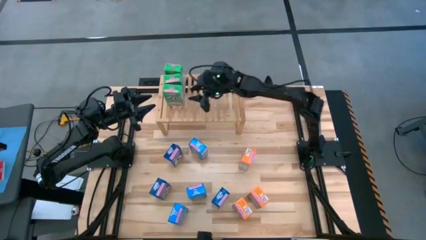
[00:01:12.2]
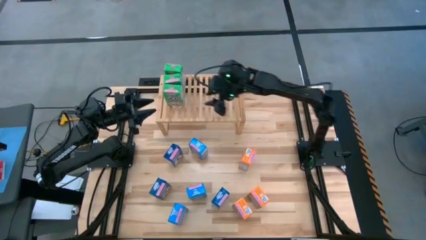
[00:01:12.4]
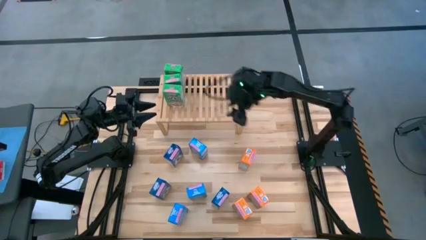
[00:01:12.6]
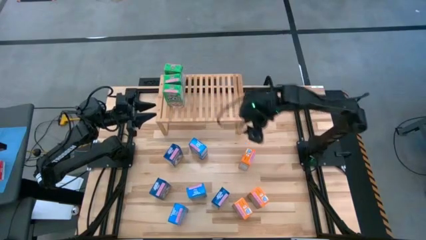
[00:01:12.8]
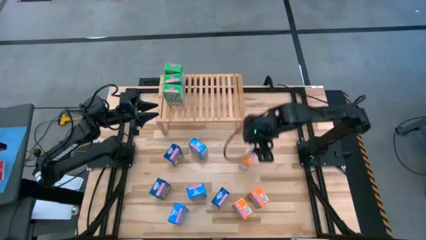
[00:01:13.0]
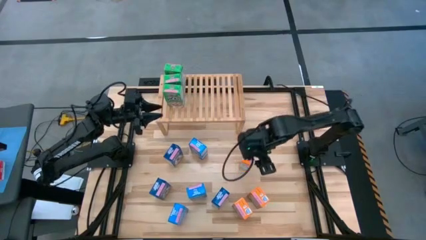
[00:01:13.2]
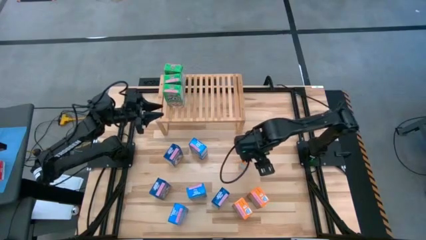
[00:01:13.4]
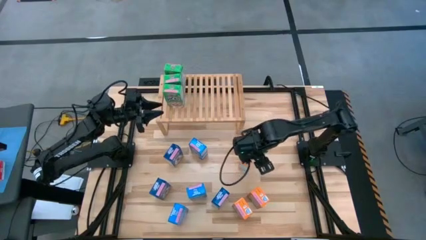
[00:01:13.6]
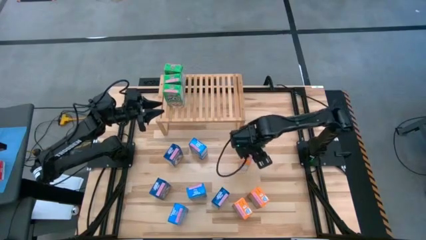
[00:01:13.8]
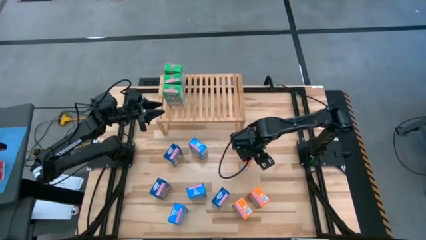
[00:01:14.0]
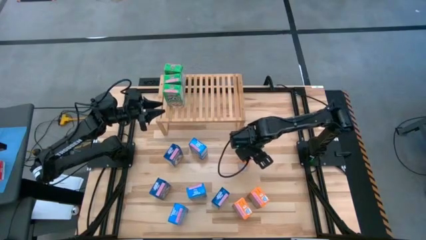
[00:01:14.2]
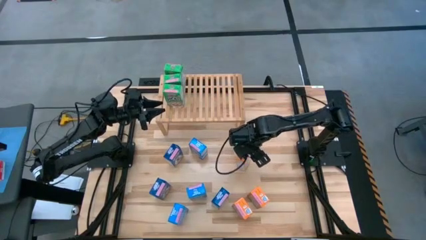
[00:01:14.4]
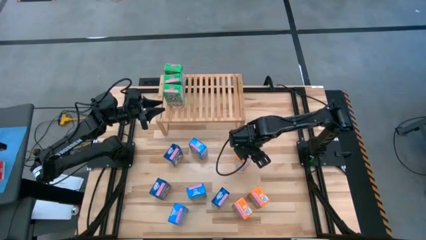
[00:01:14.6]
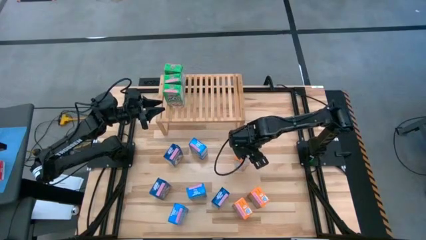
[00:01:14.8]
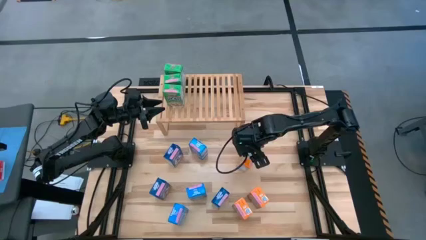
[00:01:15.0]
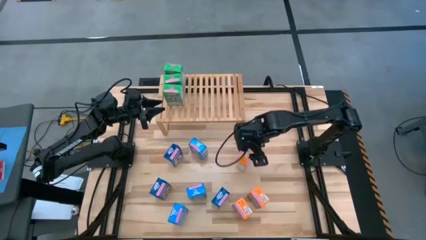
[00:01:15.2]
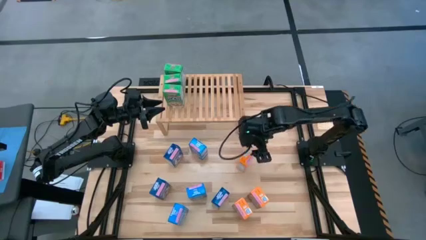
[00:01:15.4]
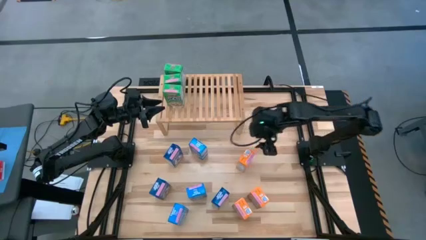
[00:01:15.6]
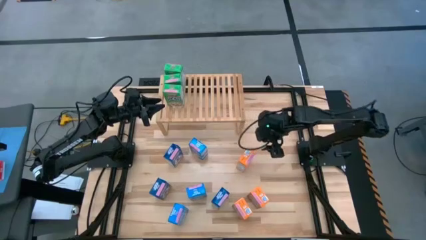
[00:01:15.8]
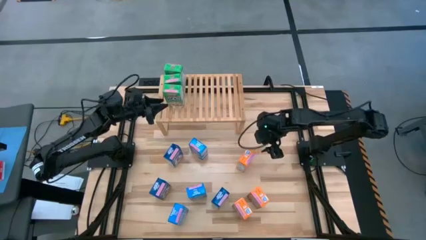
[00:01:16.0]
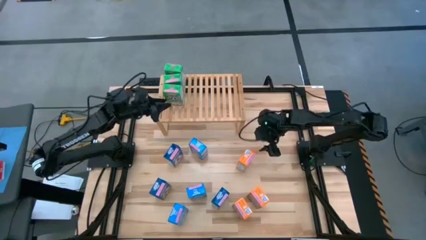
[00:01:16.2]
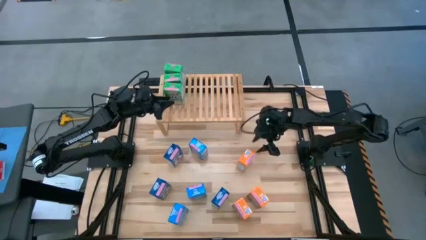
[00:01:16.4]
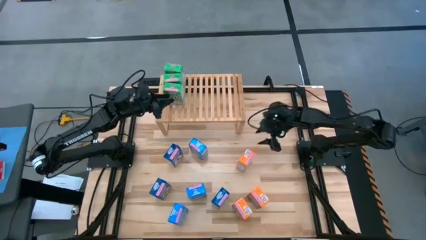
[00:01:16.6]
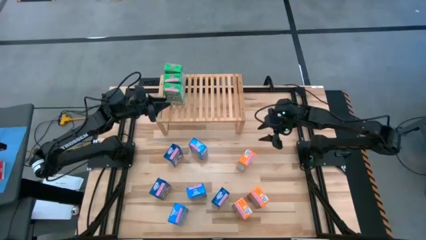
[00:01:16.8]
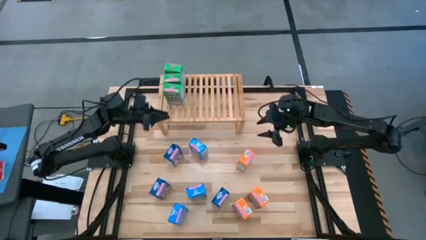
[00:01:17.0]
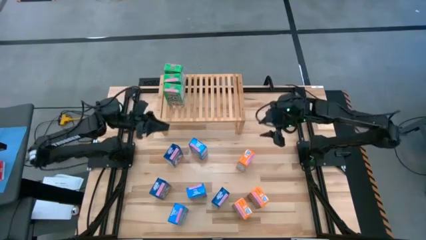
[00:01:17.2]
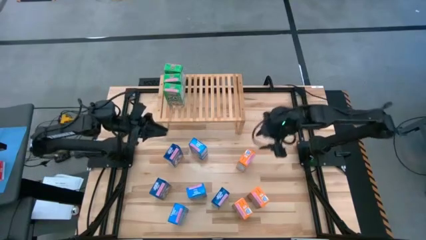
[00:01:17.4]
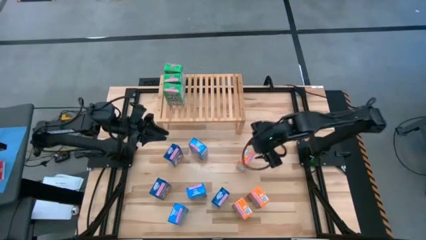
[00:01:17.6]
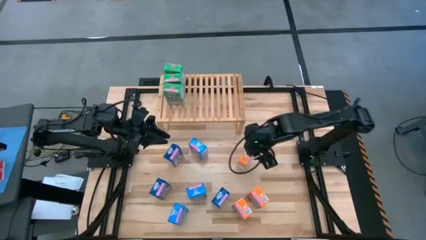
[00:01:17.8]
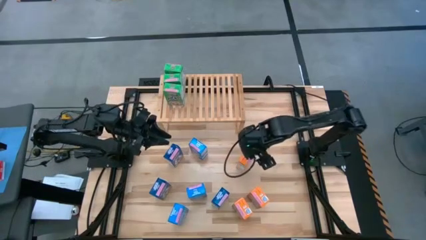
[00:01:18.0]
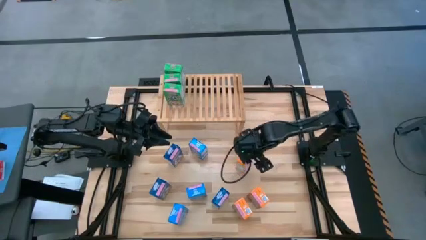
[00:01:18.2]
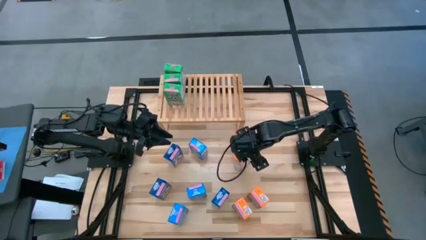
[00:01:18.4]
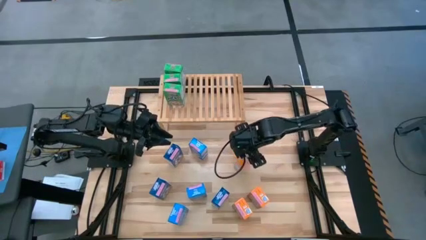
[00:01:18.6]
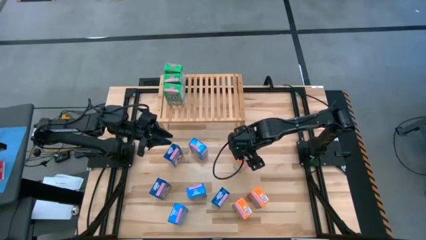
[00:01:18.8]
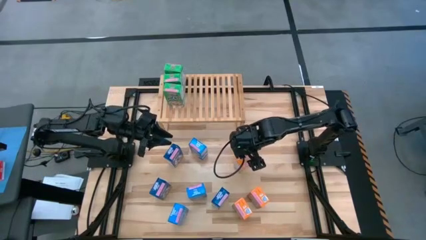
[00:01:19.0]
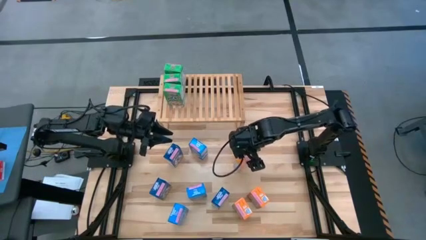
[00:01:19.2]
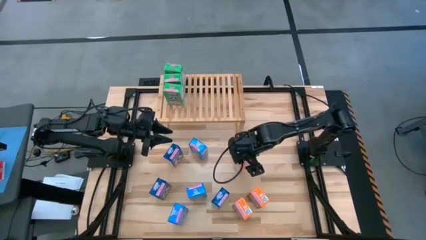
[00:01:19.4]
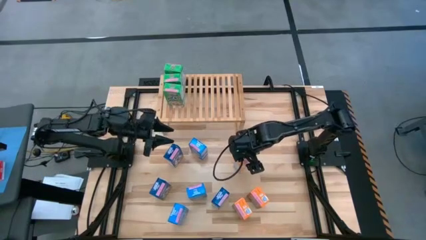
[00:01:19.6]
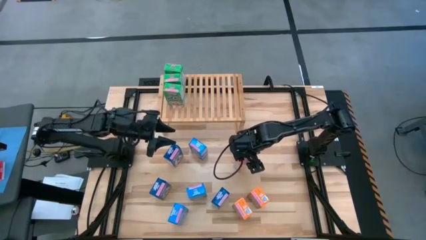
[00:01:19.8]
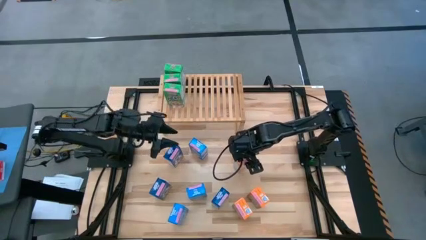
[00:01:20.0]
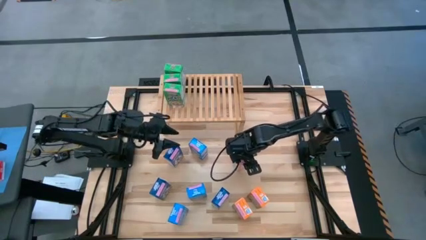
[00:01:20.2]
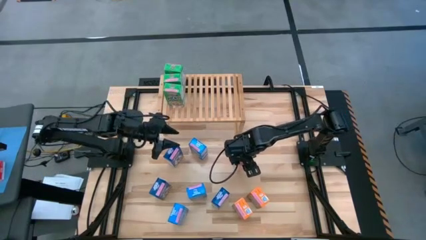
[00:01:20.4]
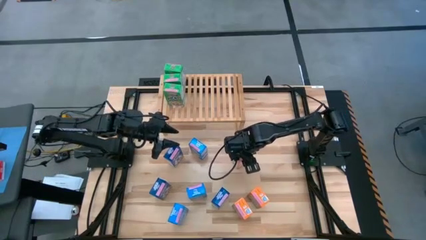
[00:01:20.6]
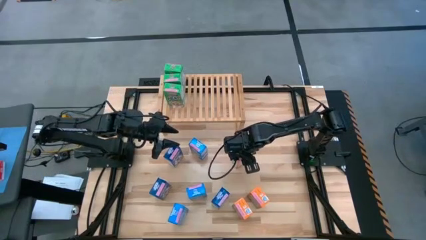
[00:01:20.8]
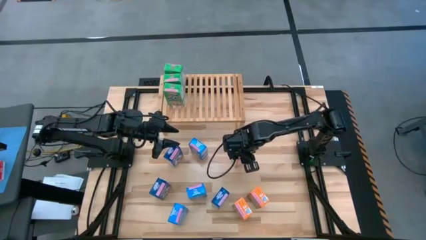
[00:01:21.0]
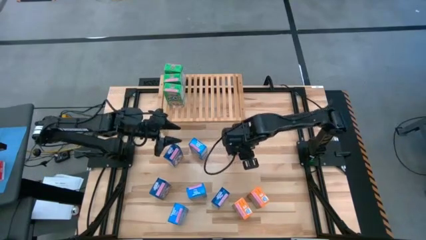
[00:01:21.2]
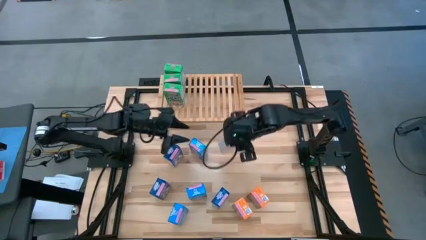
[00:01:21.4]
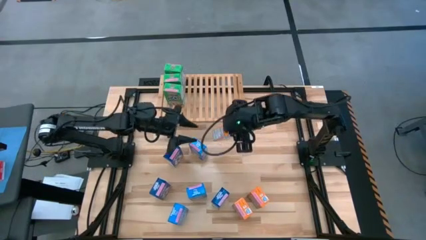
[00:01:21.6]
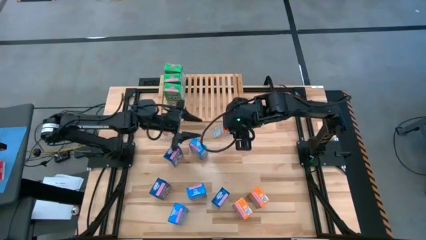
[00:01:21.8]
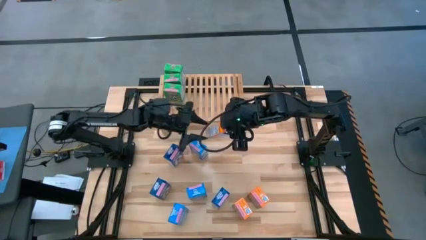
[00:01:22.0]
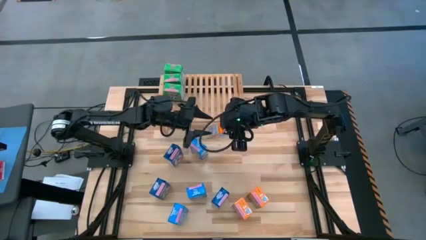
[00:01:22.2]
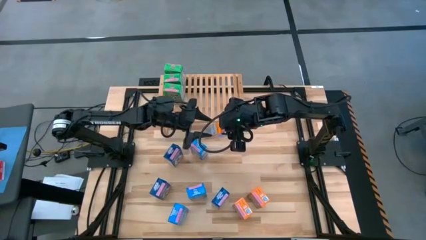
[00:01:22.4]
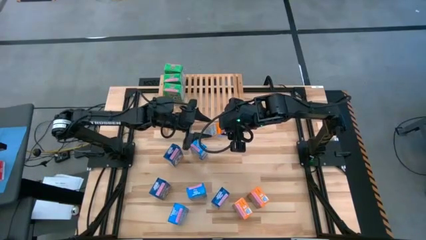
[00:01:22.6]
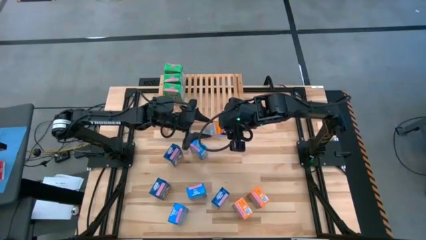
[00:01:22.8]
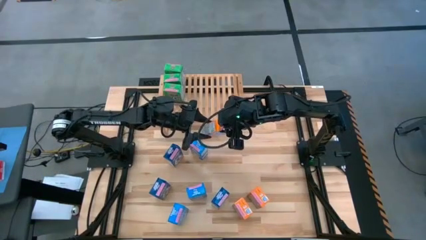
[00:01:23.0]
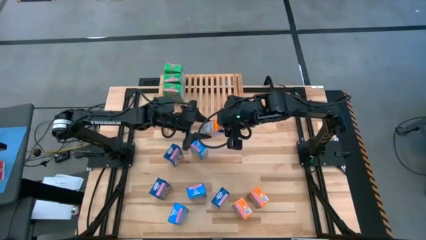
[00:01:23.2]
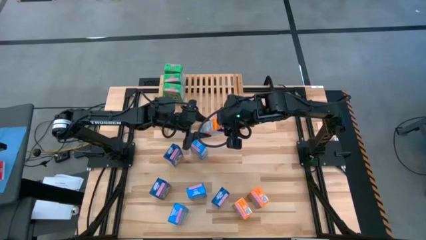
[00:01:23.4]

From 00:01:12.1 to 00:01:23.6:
Task: Stack cereal on shelf
Put the top orange cereal box on the shelf
